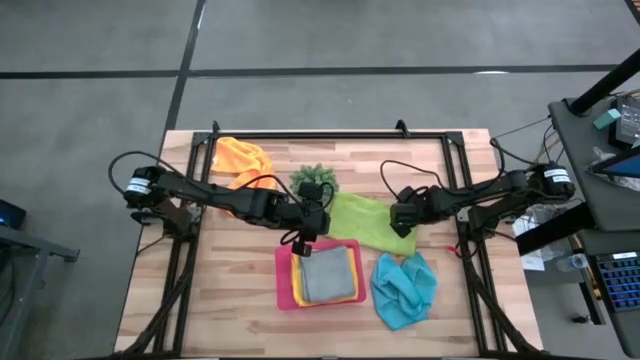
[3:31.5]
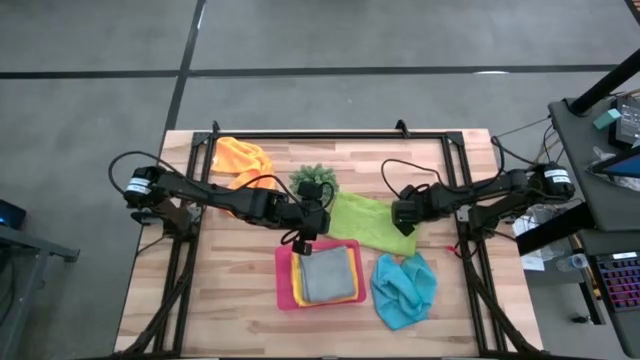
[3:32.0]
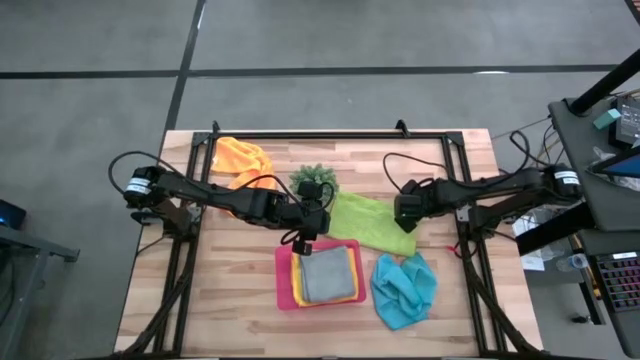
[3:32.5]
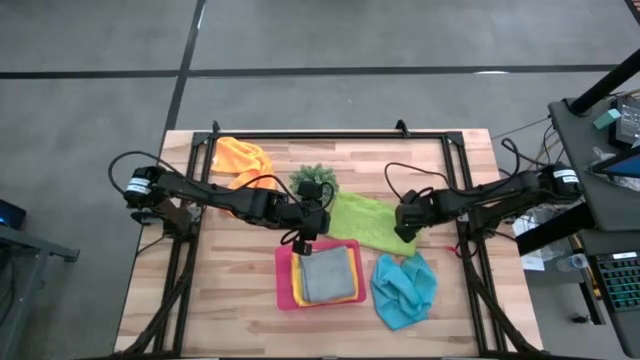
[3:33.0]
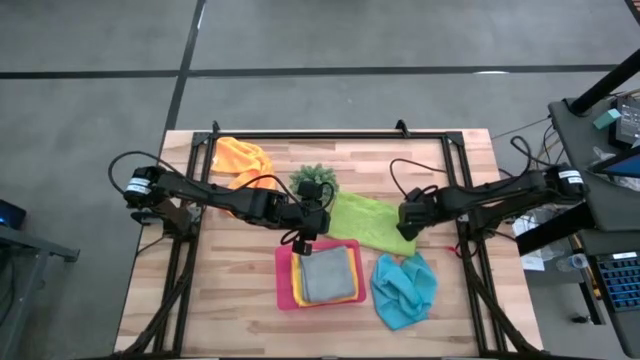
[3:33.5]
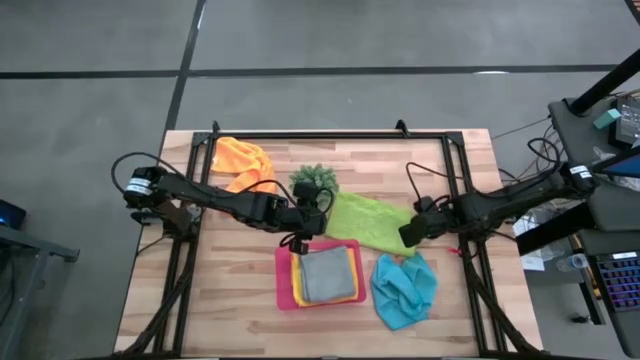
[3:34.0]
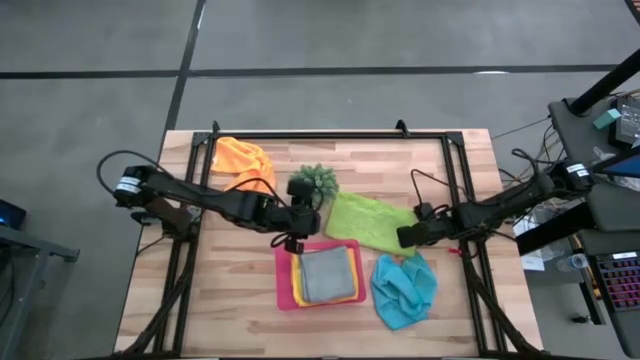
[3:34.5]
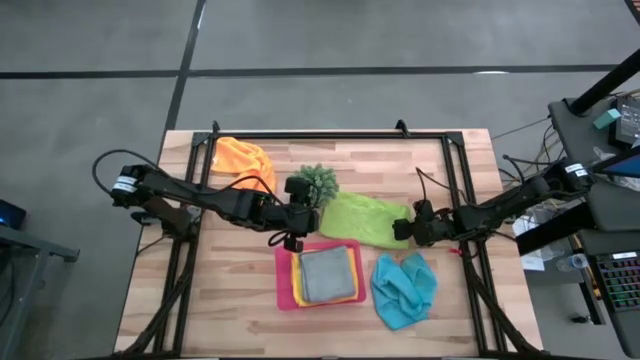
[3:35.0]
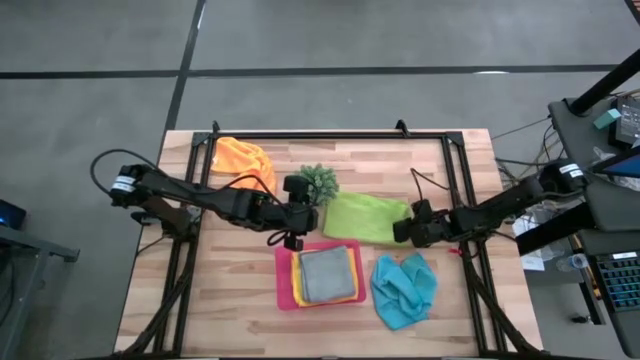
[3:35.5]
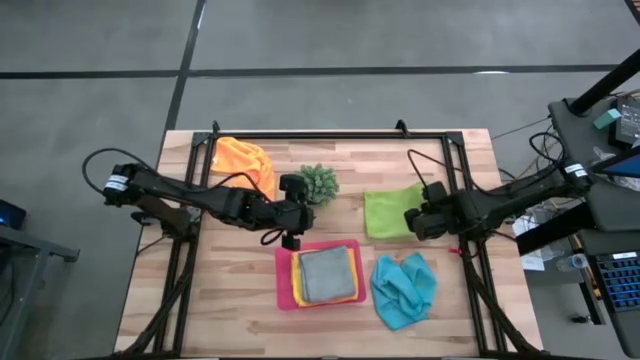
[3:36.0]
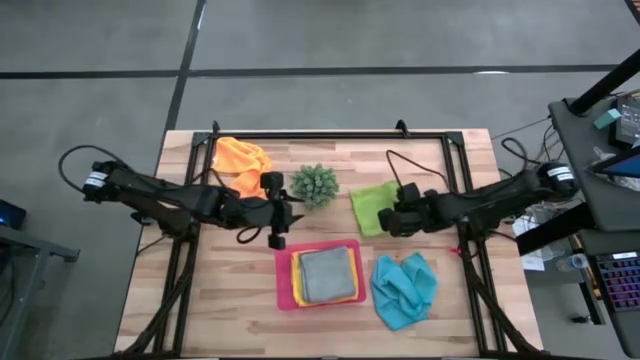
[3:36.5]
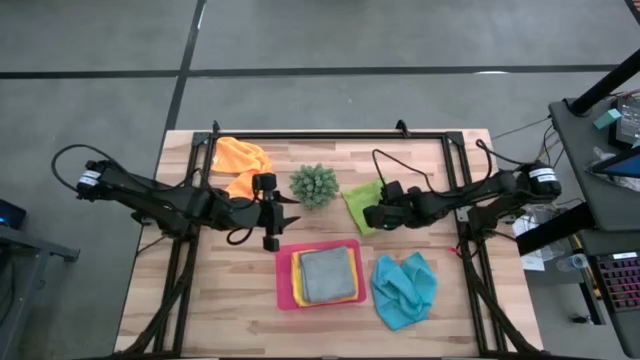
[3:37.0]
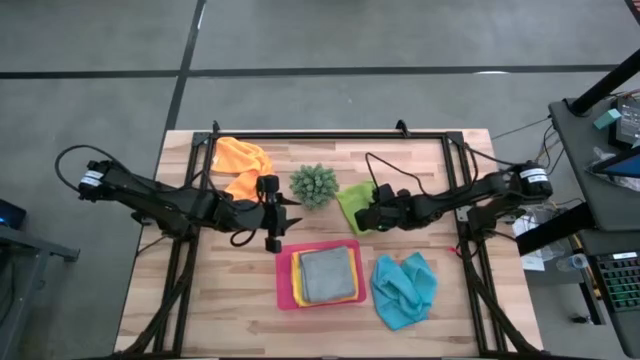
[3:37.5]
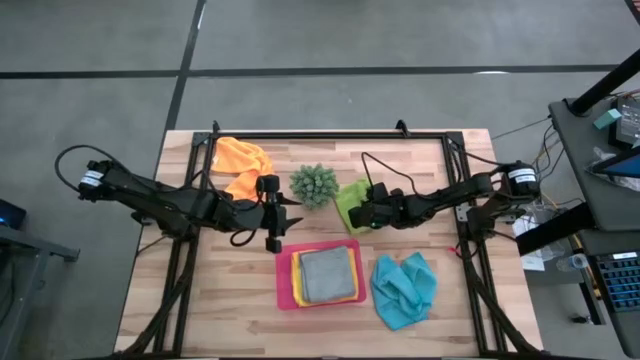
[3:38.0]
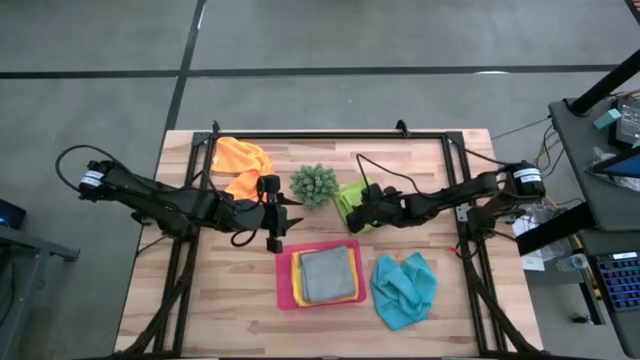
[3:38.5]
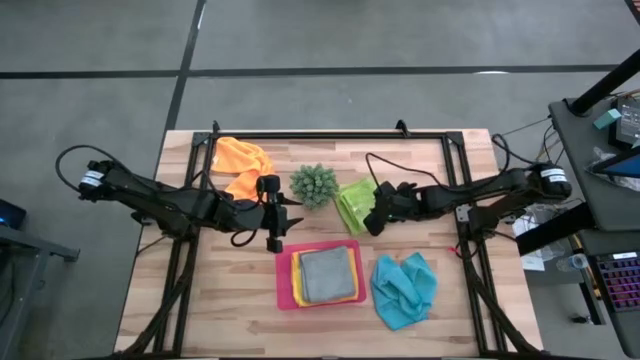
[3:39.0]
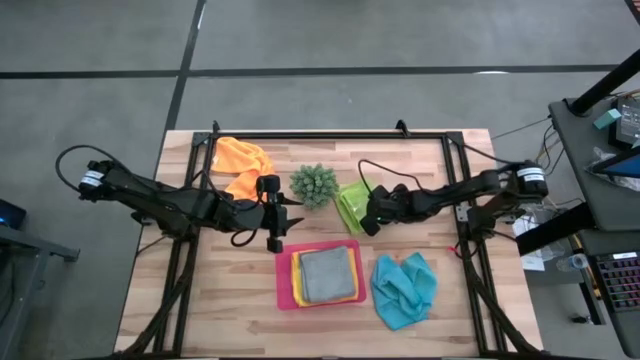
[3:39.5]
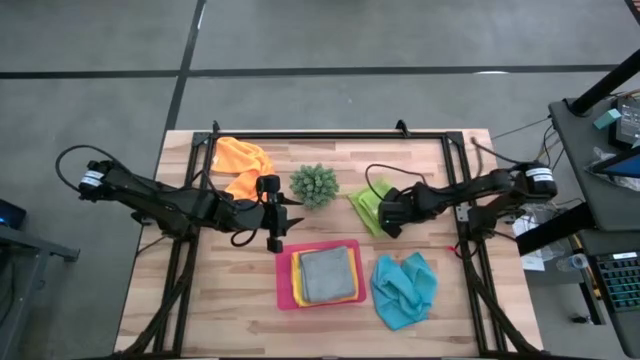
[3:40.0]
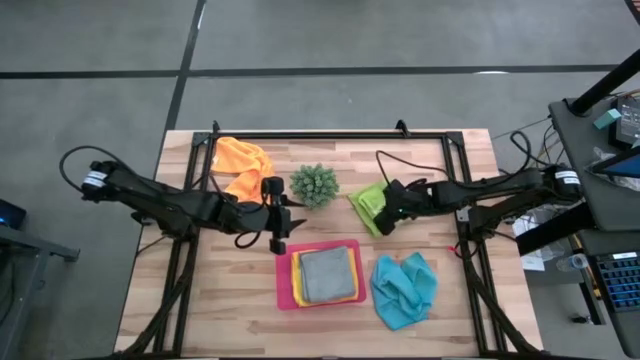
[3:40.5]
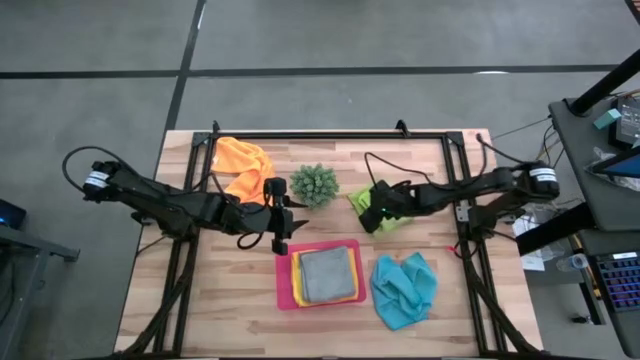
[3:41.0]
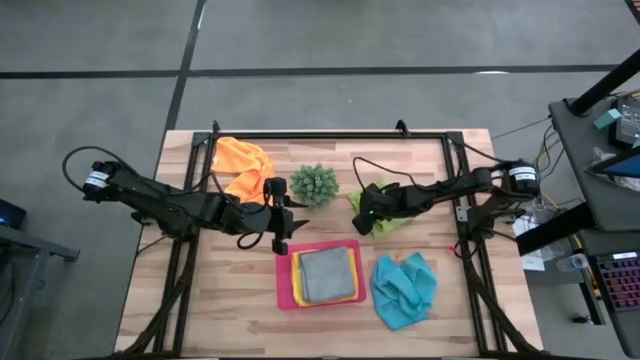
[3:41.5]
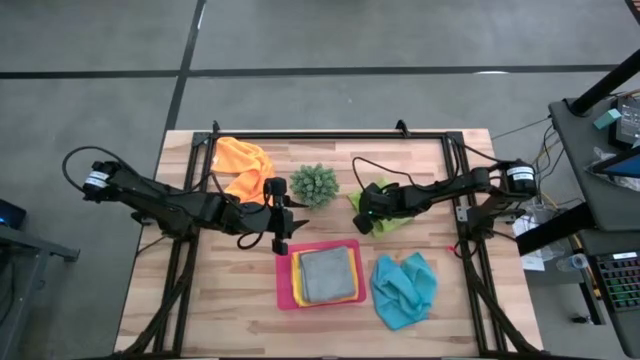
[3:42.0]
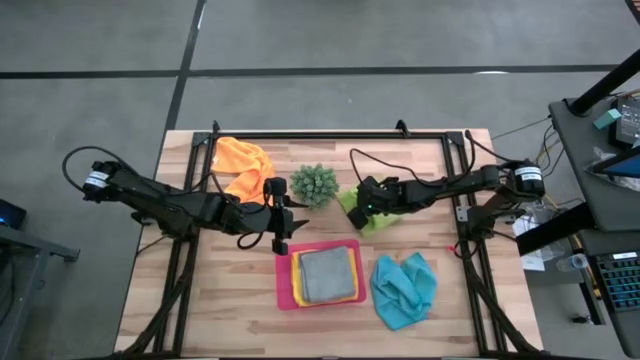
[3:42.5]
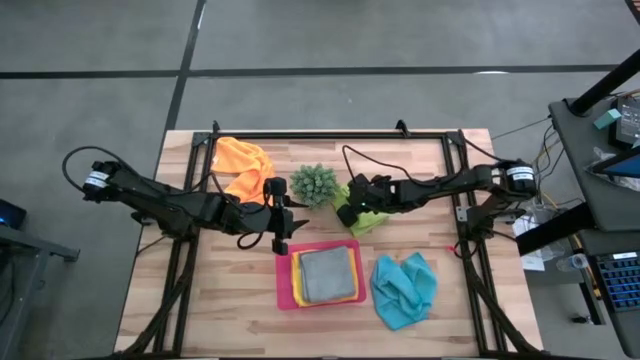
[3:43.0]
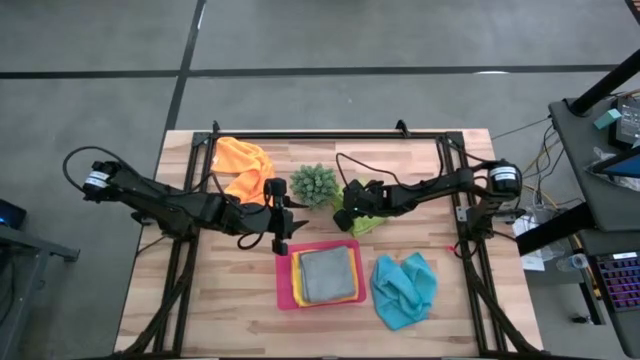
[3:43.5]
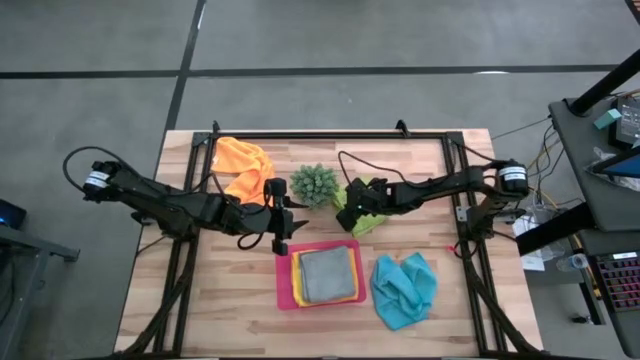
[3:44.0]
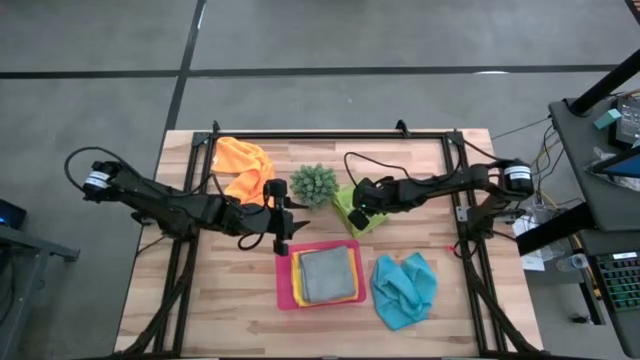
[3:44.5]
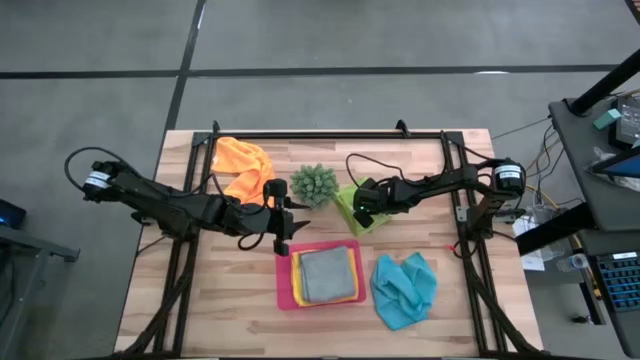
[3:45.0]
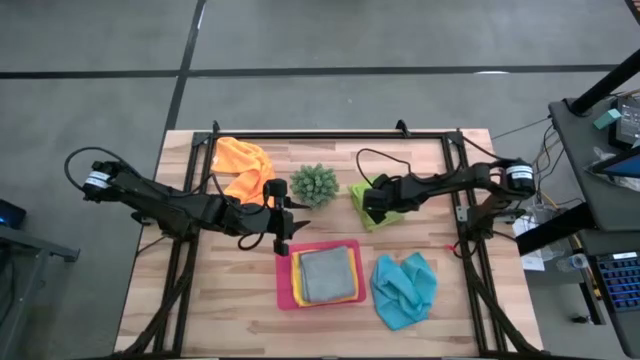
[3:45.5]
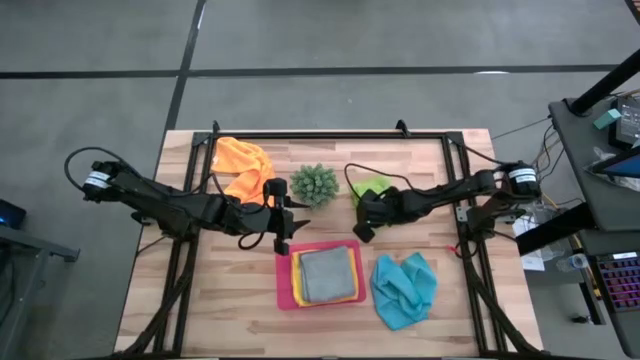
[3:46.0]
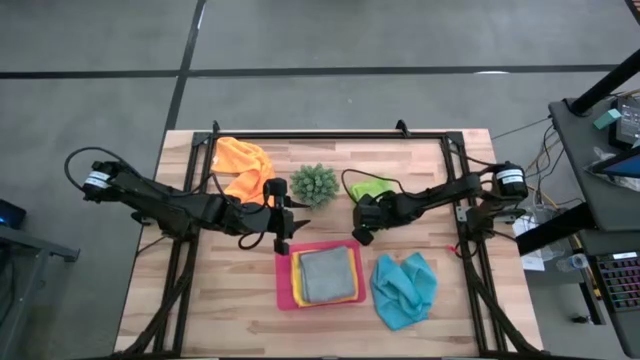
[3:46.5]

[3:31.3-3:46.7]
Task: Fold microfiber towels
Fold the green microfiber cloth

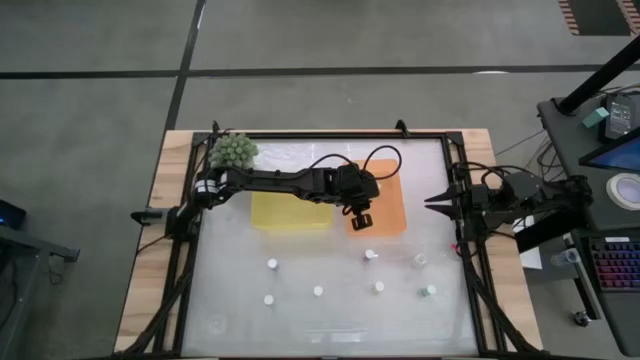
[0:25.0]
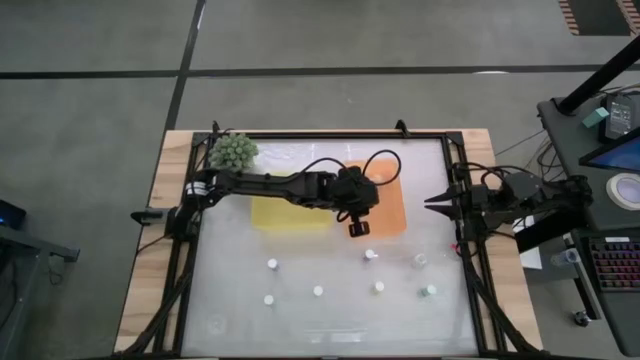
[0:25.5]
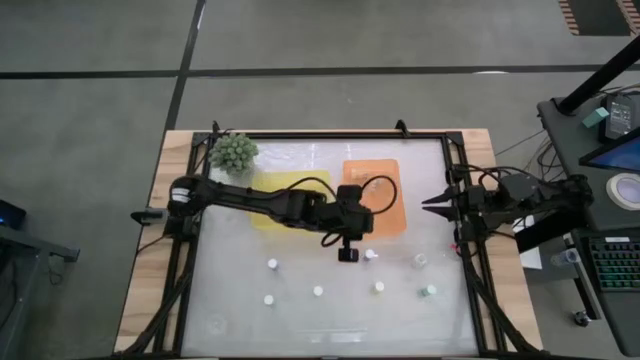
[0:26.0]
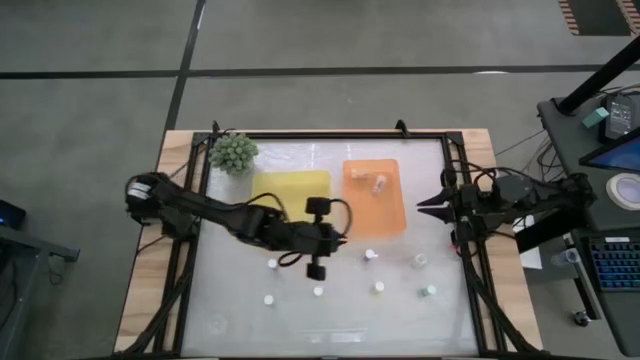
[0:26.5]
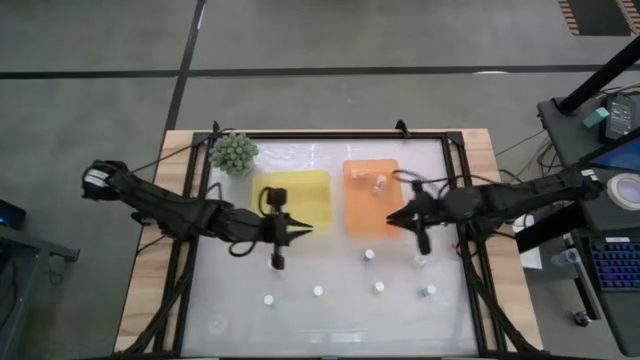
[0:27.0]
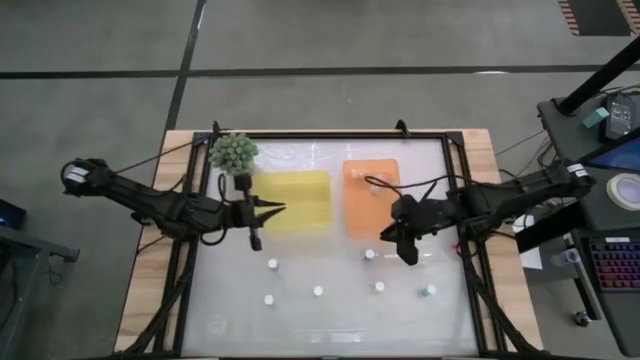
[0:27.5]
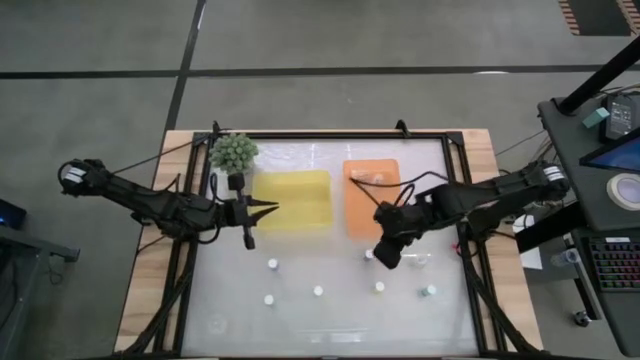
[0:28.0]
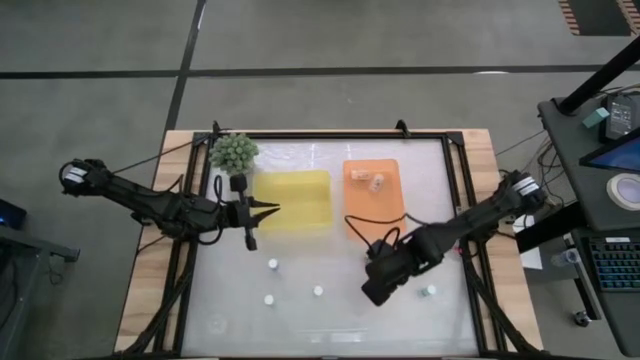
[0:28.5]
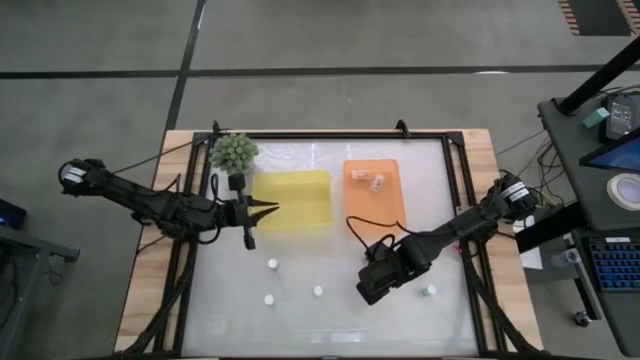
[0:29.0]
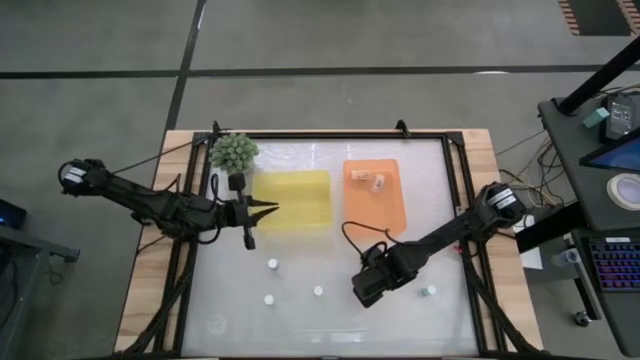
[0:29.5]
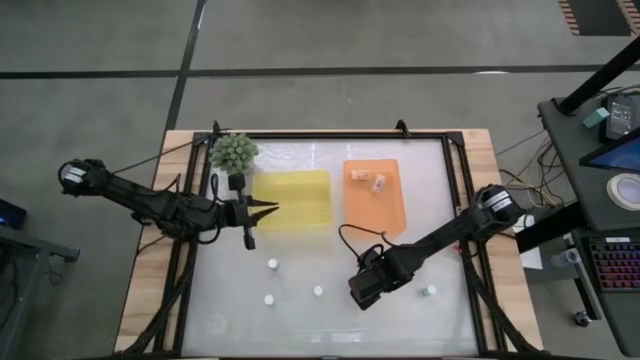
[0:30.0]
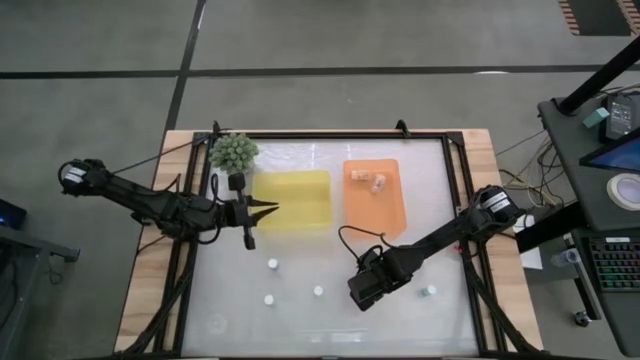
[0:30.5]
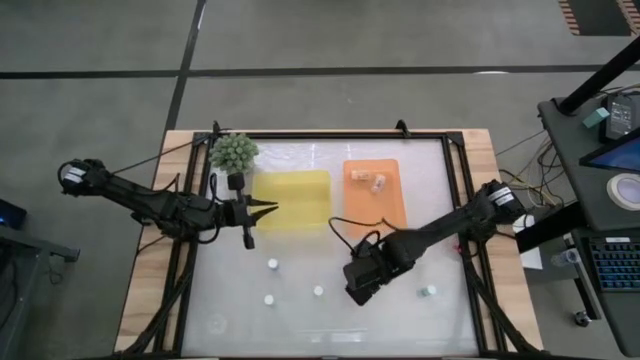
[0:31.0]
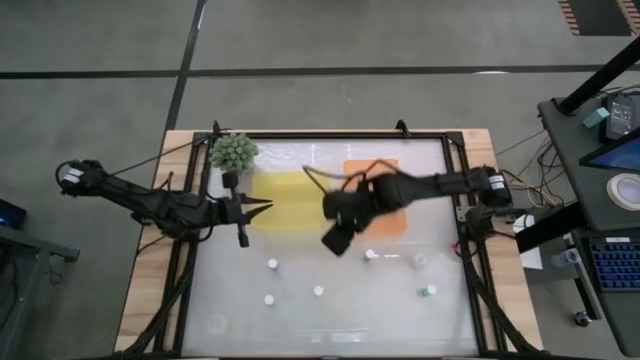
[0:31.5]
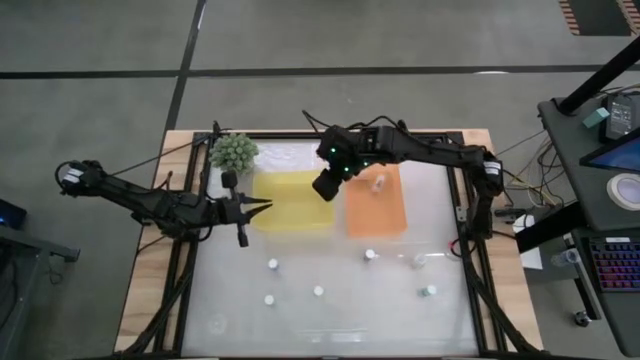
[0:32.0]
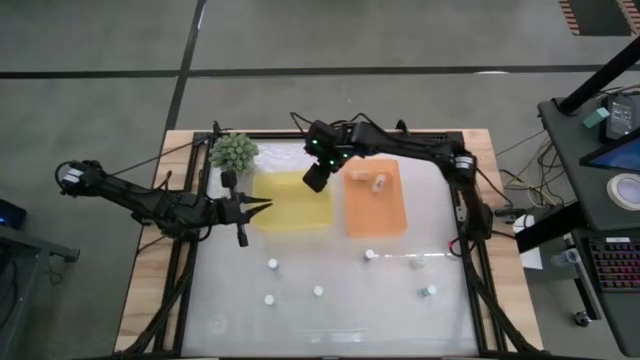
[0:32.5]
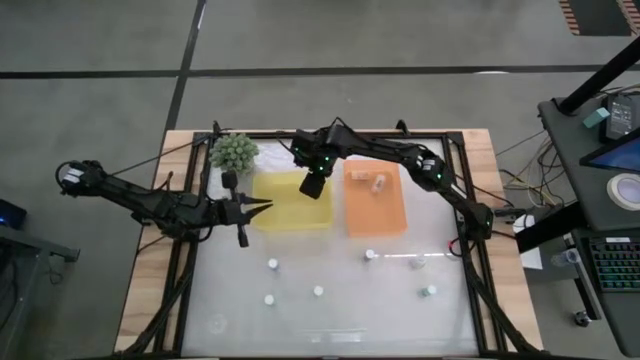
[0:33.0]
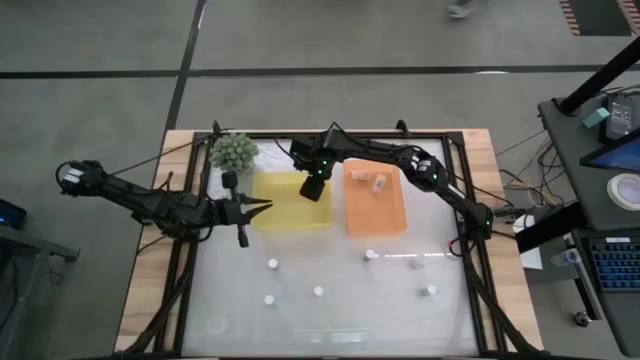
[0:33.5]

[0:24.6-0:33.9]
Task: Pick and place medicine bottles into bin by pill shape (circle, oval)
Put the bottom yellow pill bottle into the yellow bin
